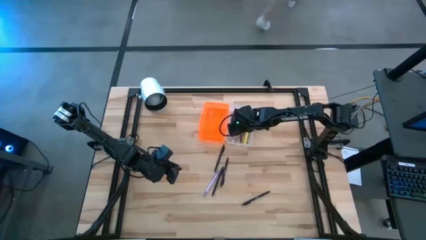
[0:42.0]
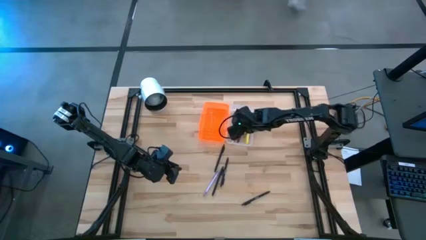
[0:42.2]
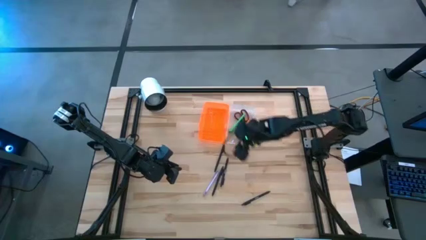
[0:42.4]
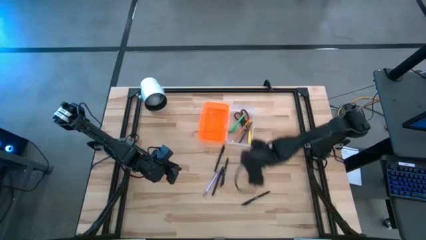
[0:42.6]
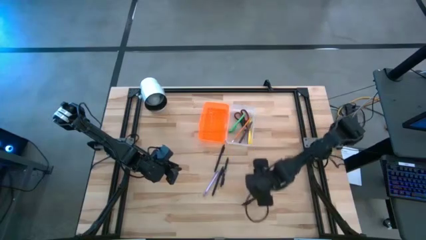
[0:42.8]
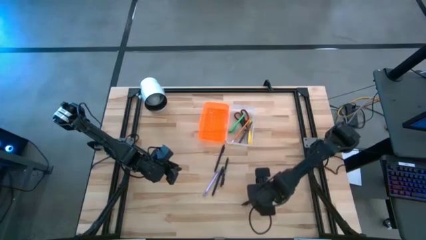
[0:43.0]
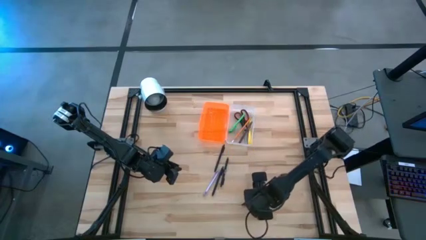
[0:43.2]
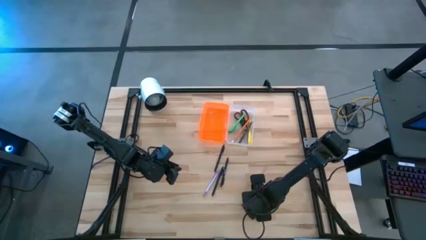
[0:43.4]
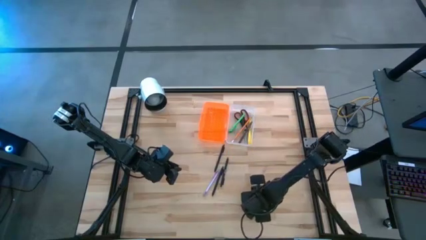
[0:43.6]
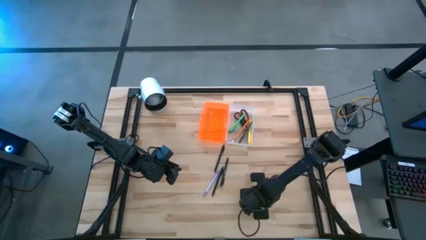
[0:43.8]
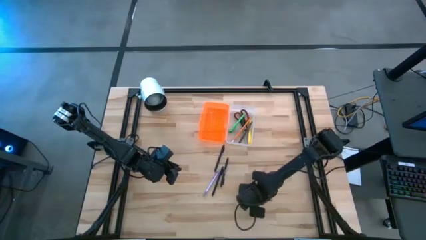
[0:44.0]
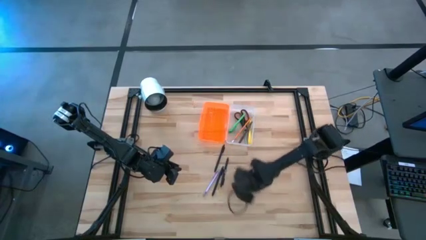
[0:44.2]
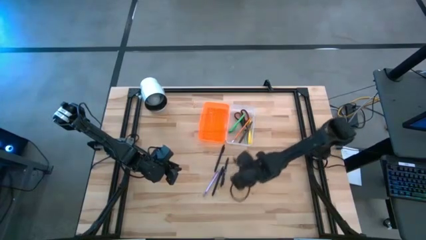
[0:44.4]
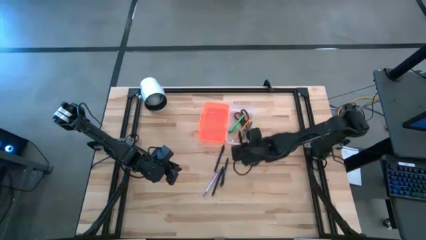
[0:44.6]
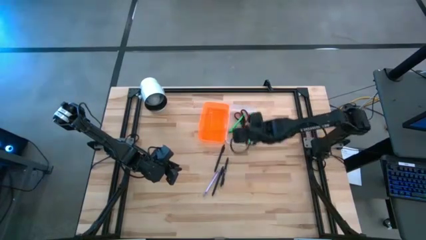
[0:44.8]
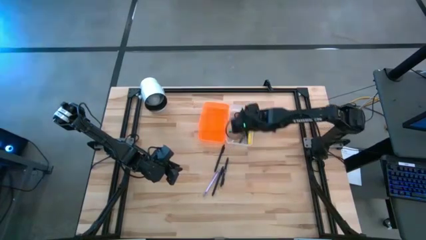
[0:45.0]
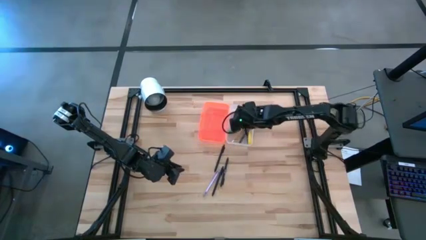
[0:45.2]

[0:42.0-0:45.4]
Task: Pick & place school supplies into a supply box
Put the black pen into the orange supply box

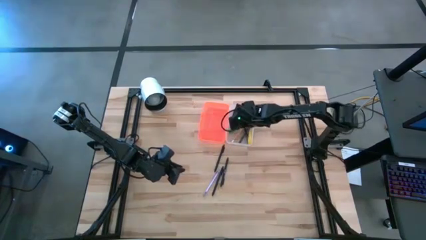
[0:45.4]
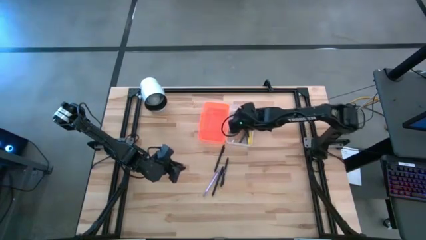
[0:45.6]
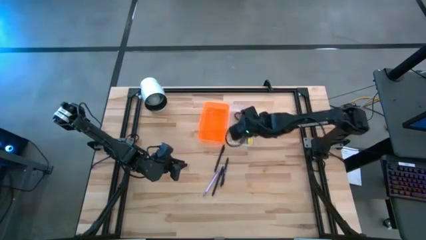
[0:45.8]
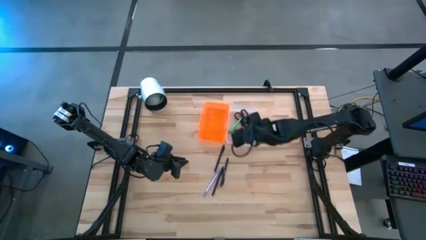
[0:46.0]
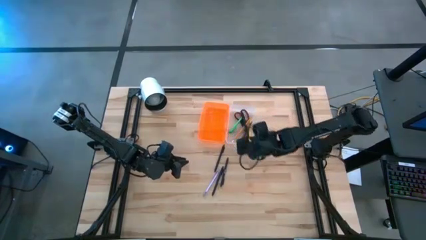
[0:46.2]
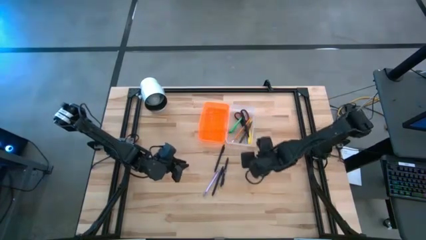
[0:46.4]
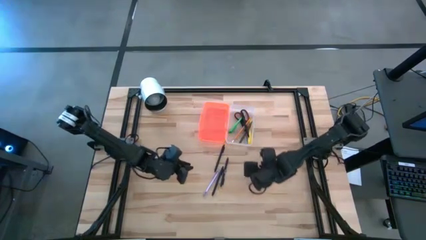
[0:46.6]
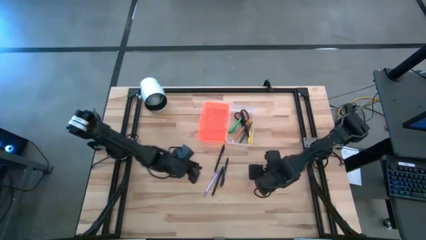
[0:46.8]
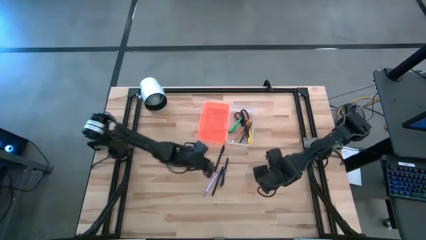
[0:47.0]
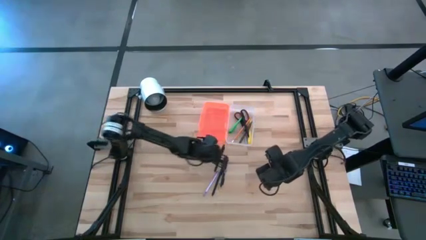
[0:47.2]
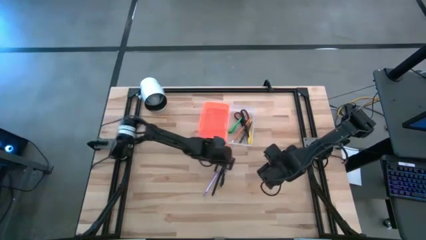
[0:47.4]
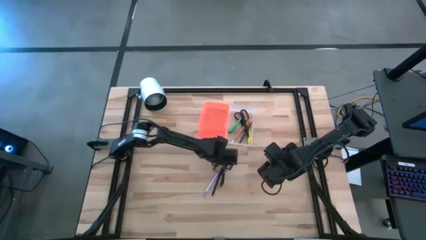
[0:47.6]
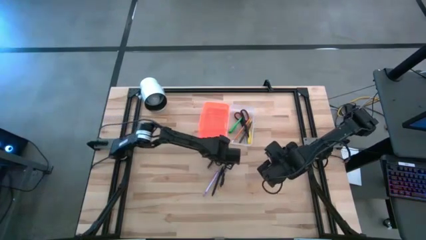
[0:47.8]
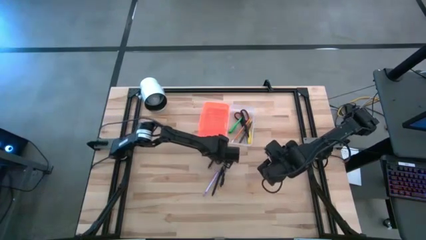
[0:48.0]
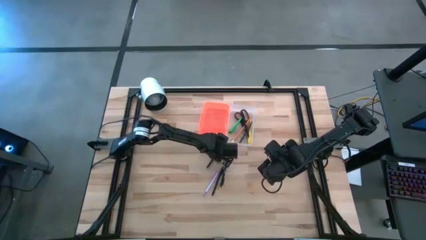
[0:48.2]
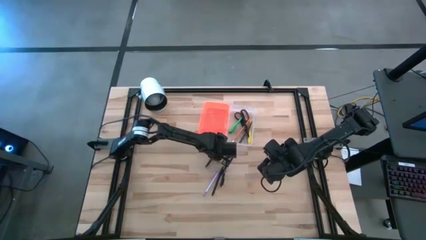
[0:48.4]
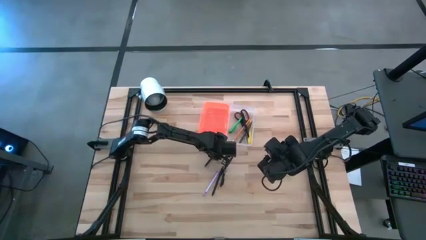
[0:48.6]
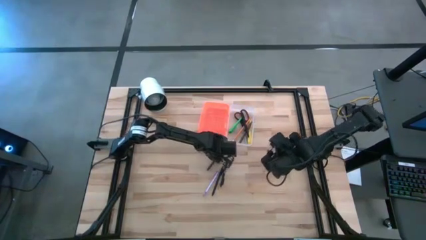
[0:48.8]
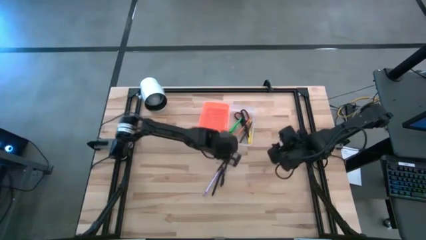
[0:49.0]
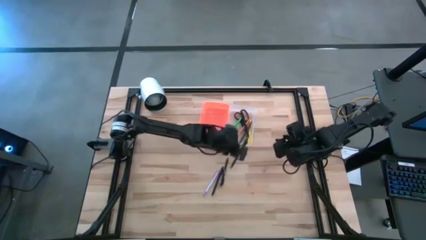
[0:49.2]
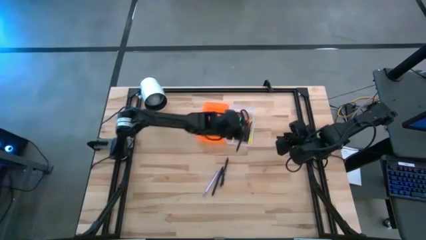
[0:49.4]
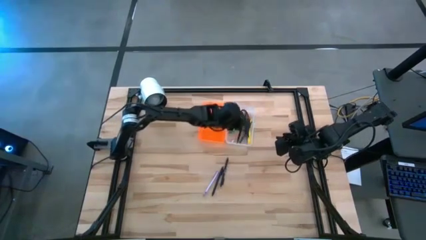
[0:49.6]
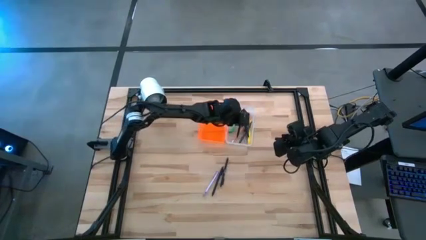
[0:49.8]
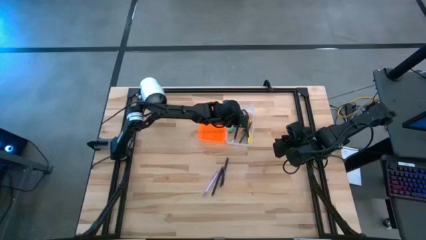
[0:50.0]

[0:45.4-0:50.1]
Put the top black pen into the orange supply box

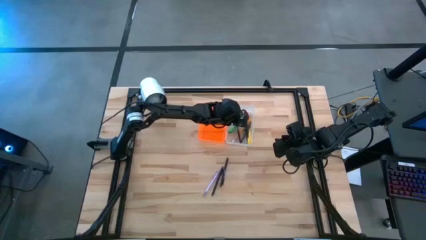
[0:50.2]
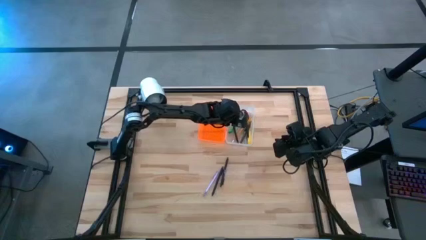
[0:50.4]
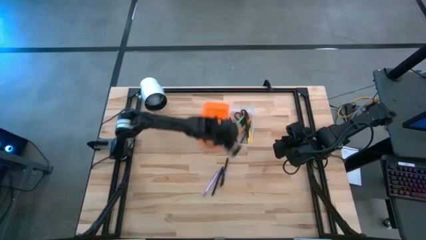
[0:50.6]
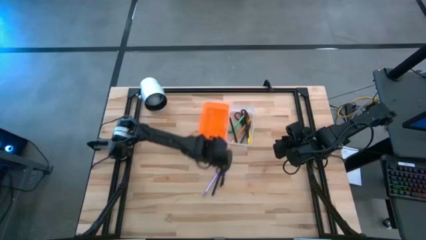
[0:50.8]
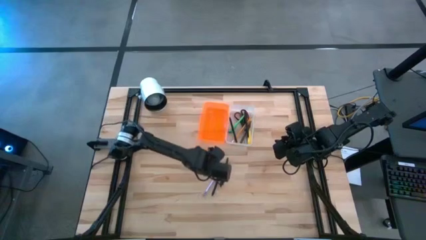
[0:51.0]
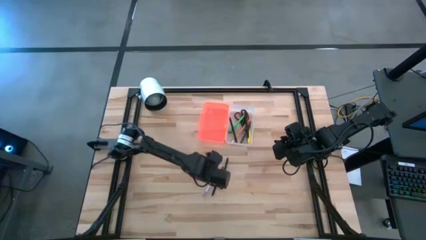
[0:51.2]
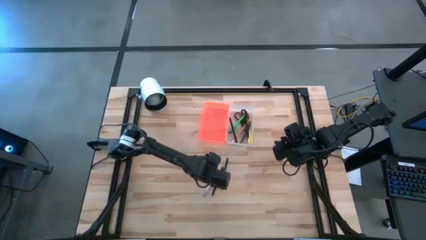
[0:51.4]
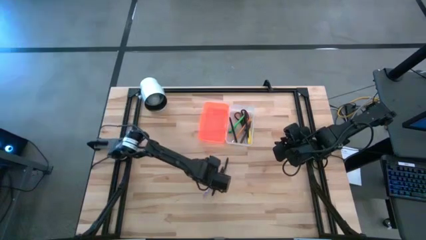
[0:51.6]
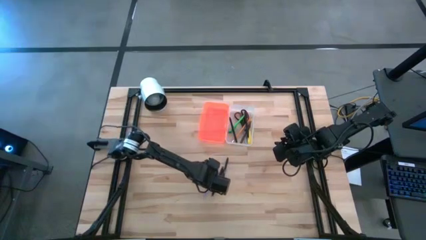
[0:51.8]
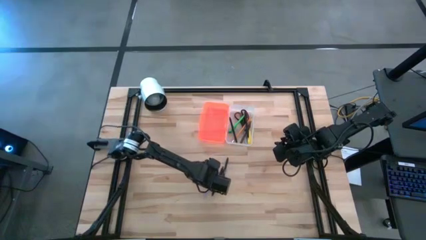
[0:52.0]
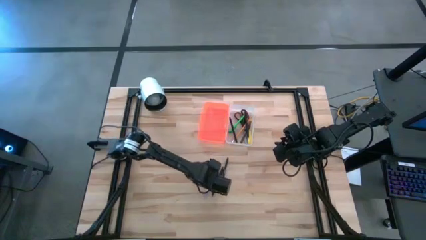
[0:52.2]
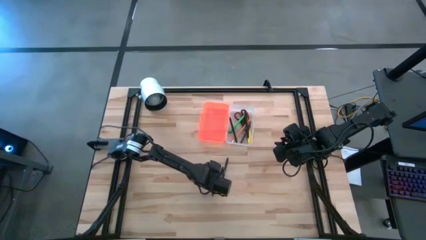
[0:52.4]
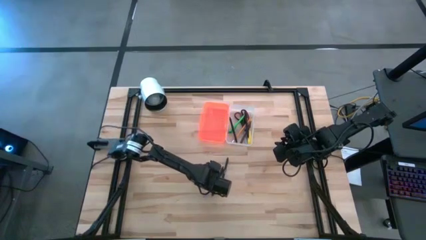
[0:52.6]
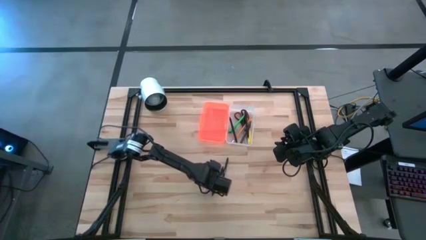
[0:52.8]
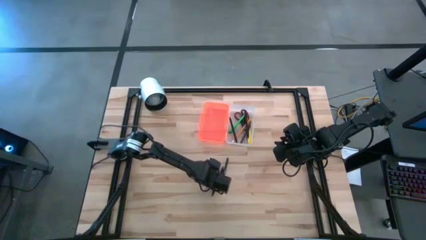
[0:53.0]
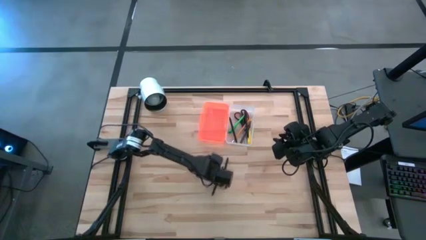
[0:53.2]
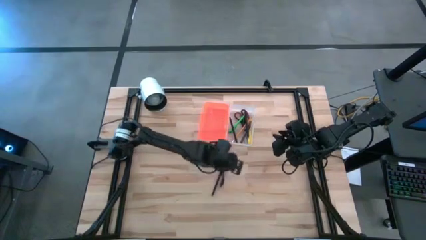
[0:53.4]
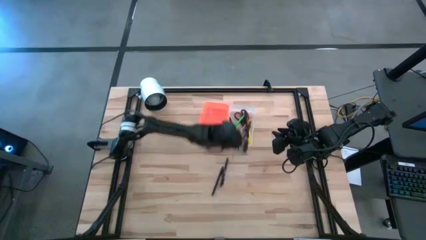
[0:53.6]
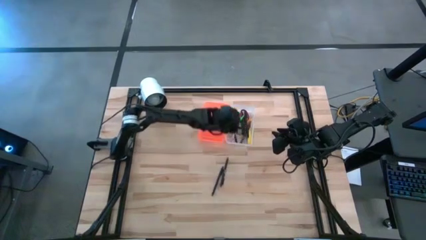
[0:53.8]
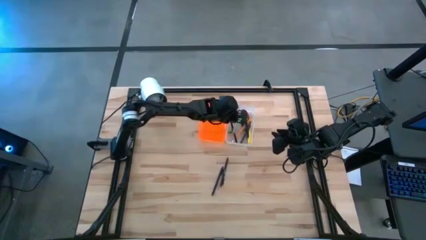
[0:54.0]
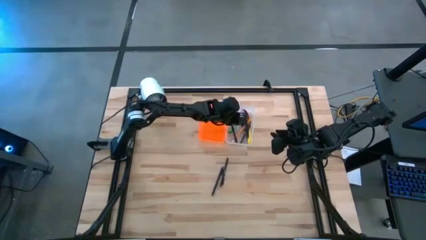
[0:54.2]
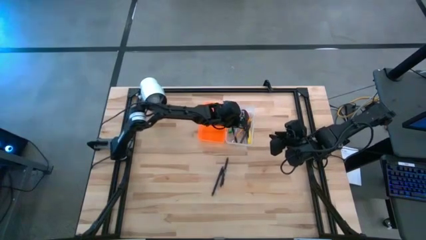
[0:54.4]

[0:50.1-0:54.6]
Put the purple pen into the orange supply box

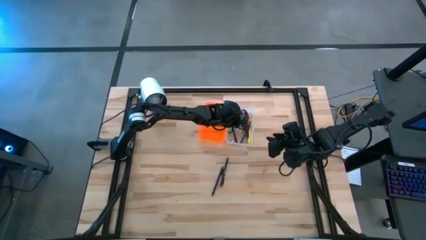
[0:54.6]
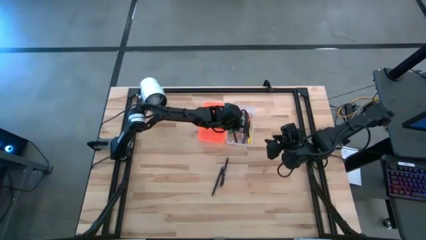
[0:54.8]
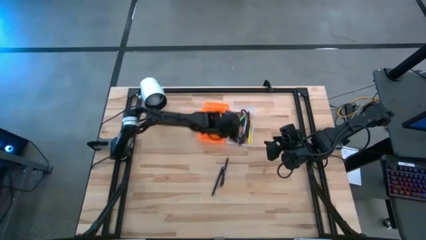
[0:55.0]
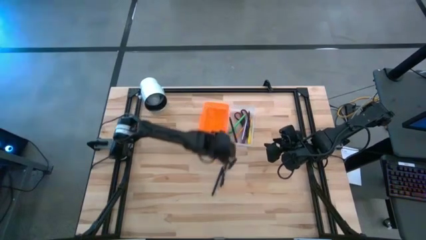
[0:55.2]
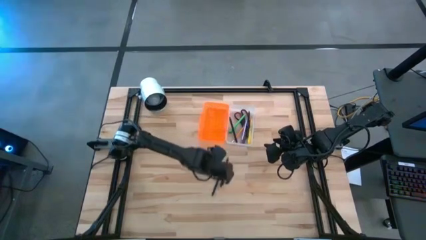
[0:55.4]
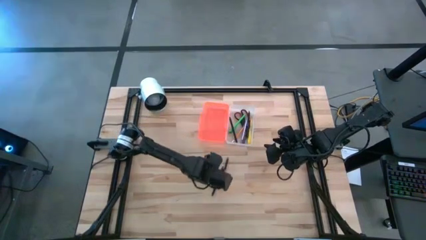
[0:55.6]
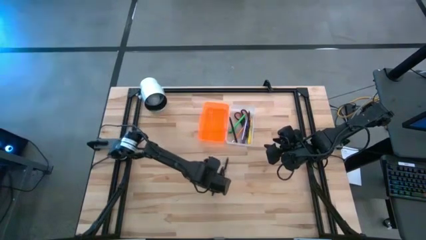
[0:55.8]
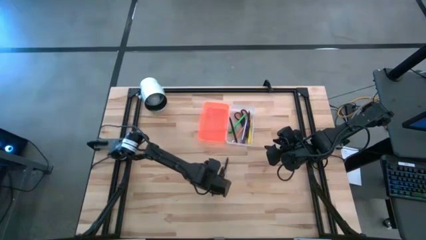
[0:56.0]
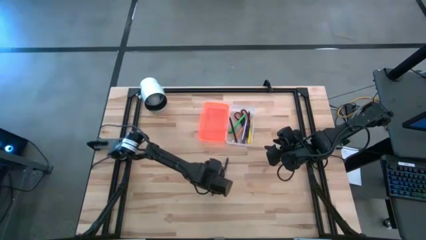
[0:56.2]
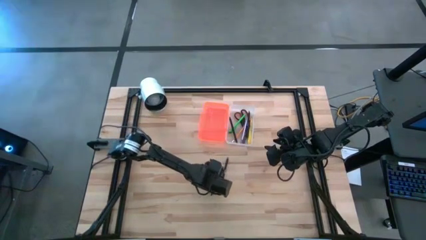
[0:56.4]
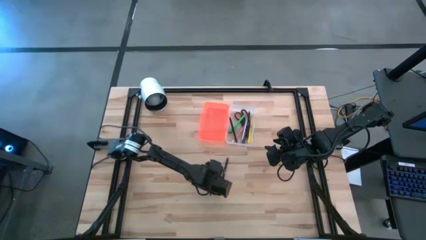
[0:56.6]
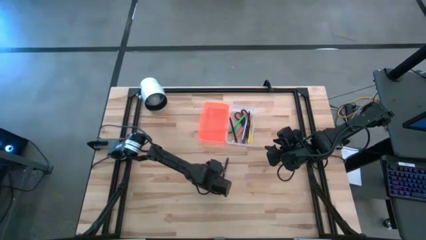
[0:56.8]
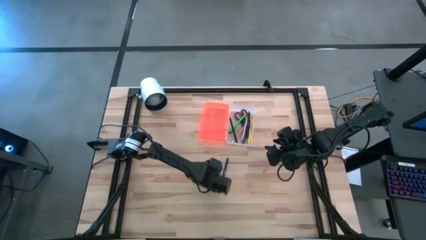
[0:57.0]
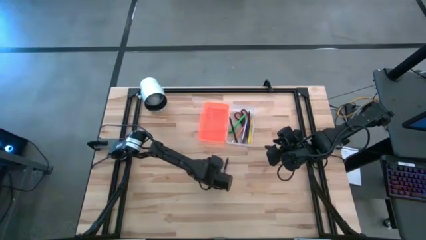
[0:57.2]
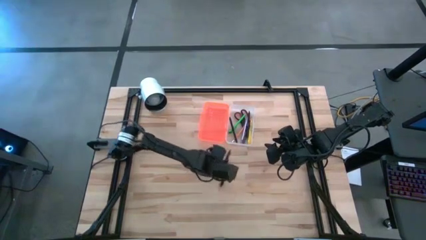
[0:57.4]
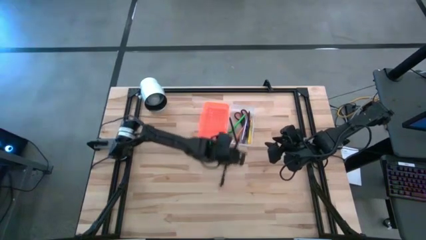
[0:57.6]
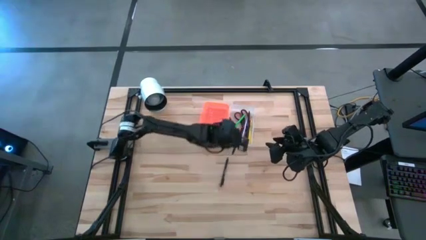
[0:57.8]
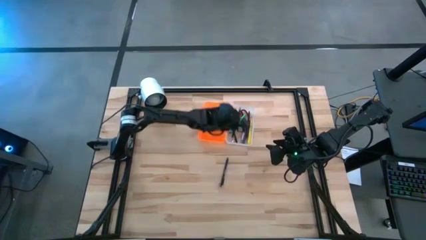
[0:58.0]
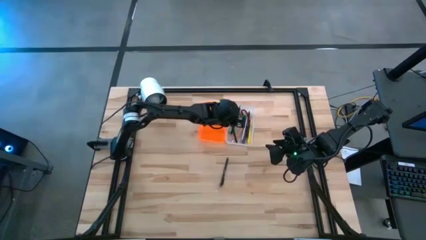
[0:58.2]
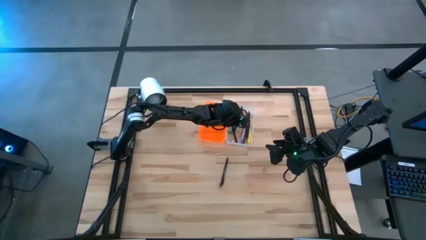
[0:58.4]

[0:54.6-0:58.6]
Put the left black pen into the orange supply box
